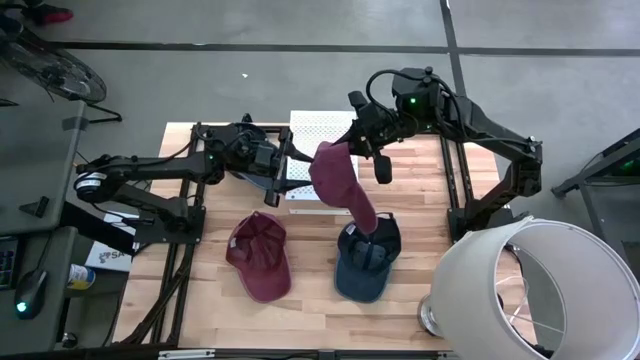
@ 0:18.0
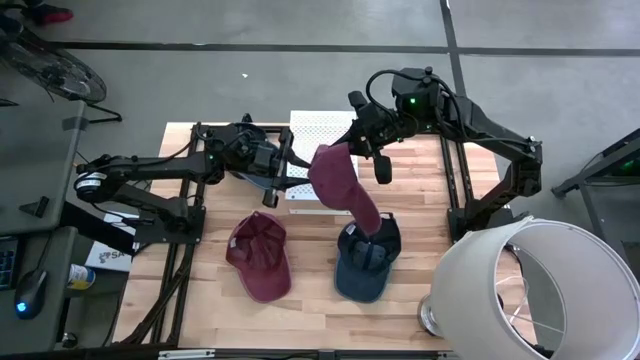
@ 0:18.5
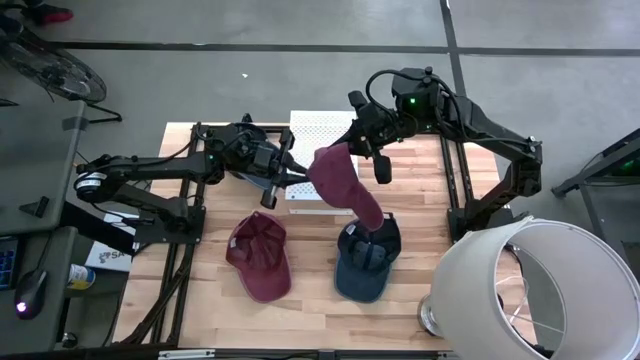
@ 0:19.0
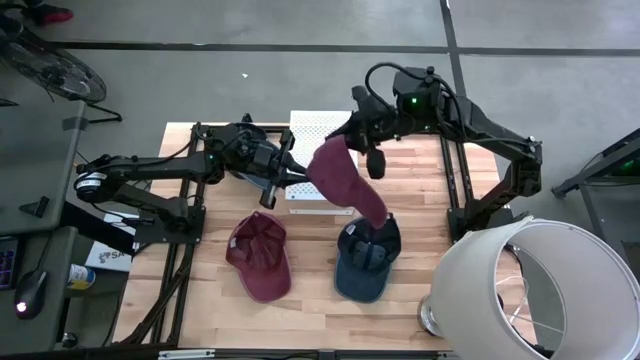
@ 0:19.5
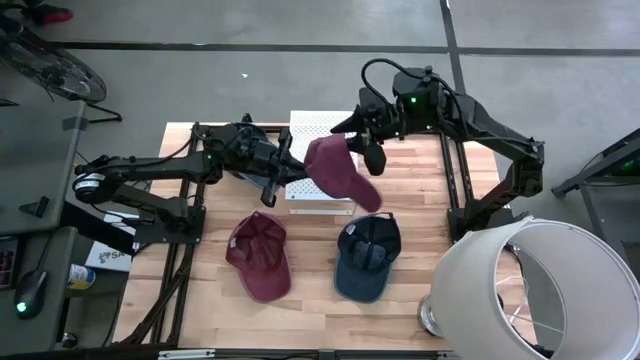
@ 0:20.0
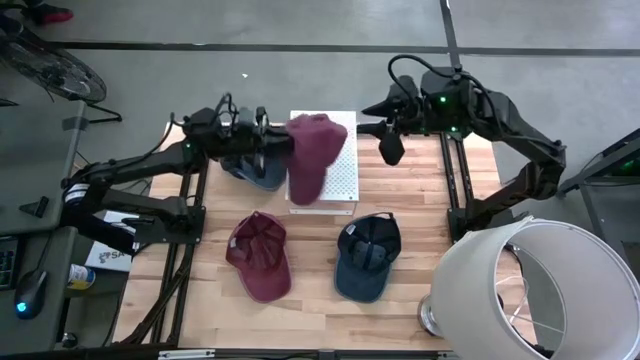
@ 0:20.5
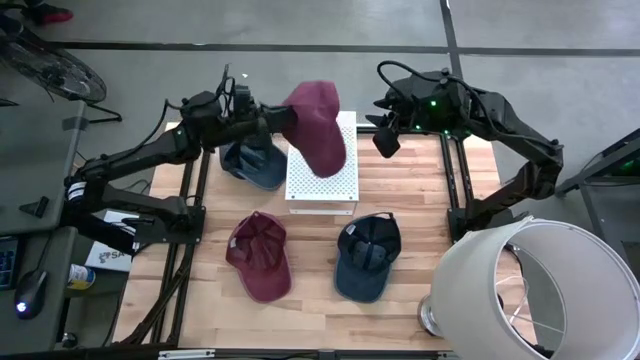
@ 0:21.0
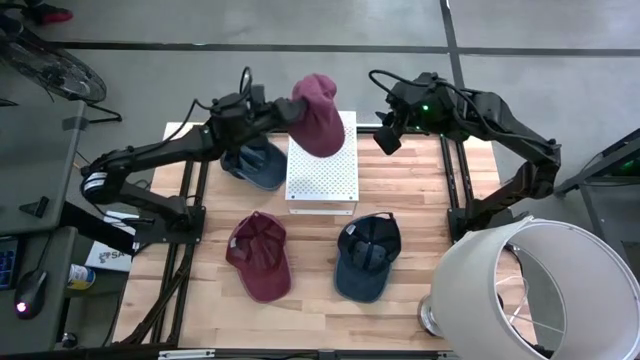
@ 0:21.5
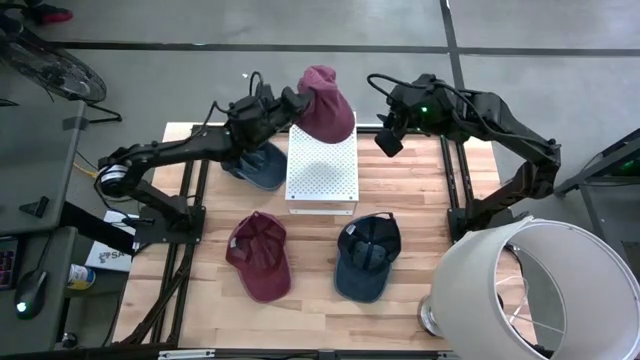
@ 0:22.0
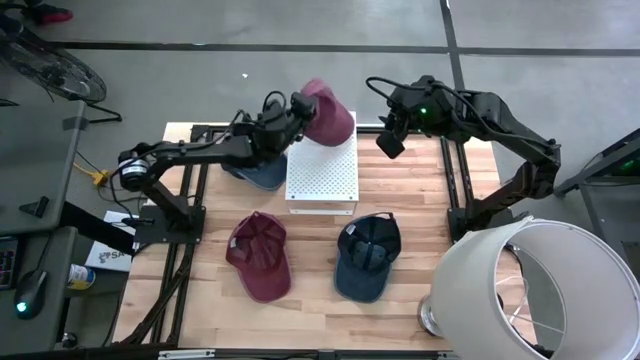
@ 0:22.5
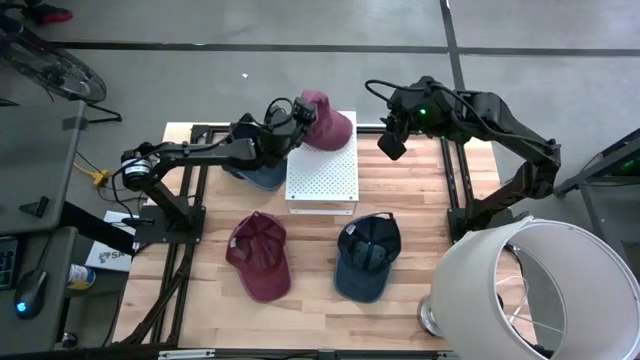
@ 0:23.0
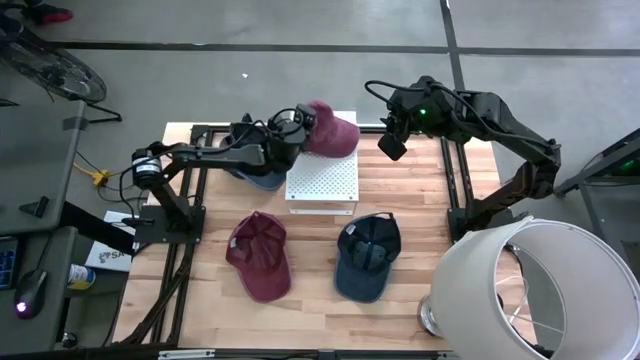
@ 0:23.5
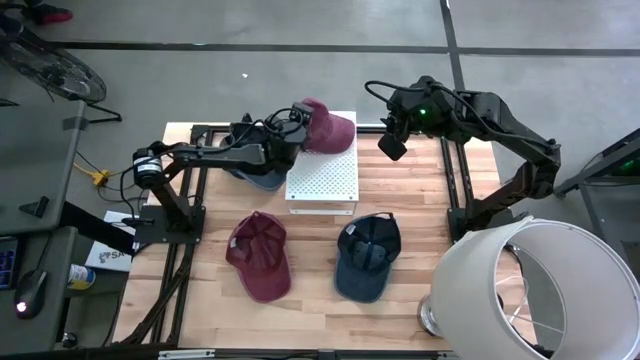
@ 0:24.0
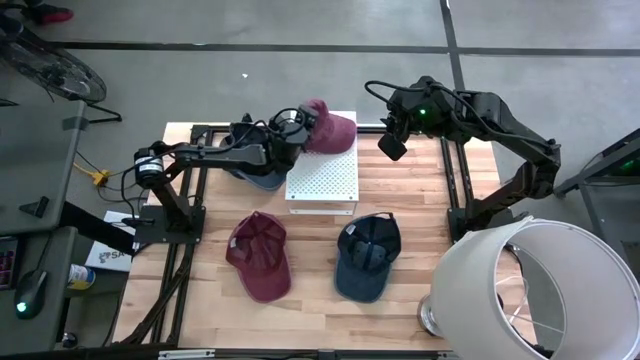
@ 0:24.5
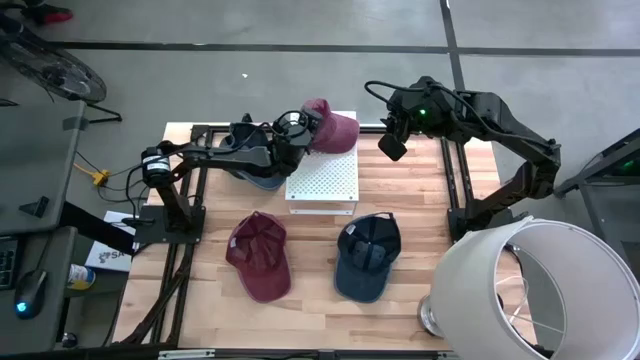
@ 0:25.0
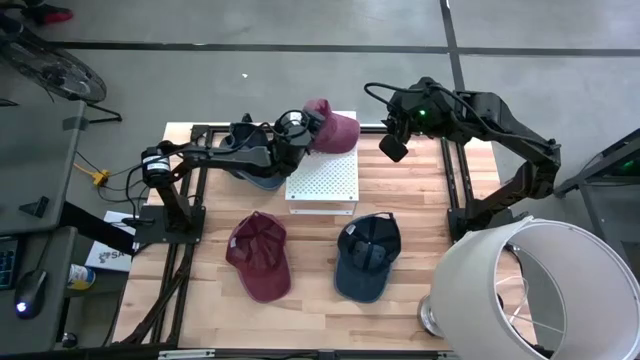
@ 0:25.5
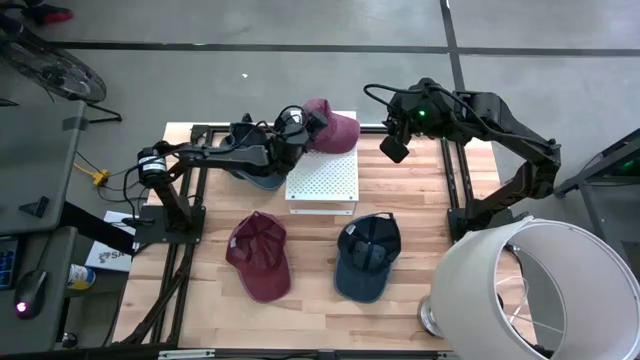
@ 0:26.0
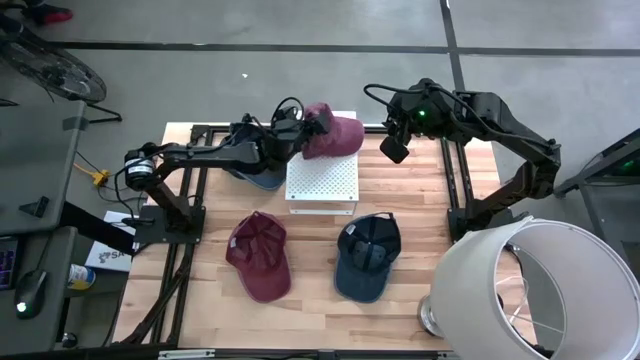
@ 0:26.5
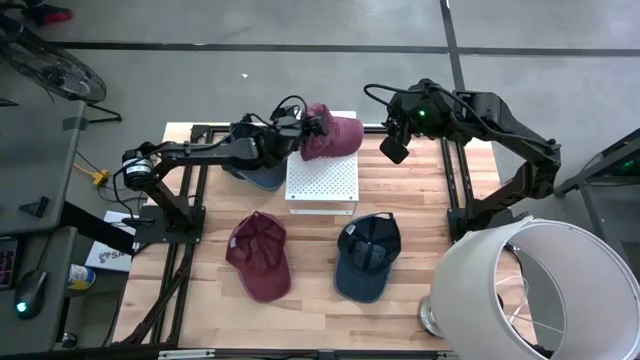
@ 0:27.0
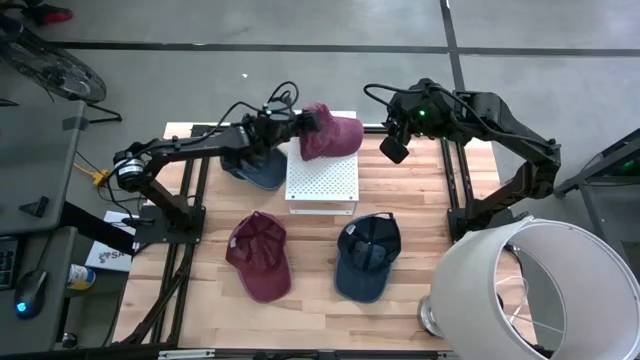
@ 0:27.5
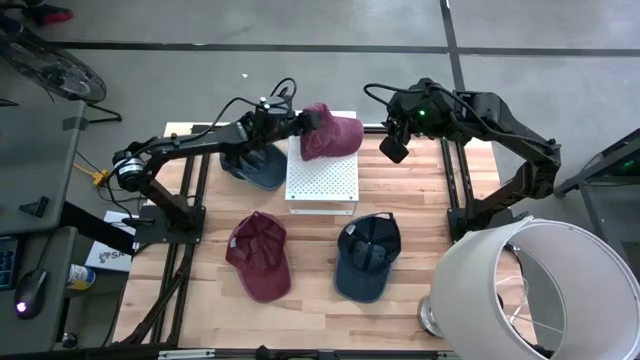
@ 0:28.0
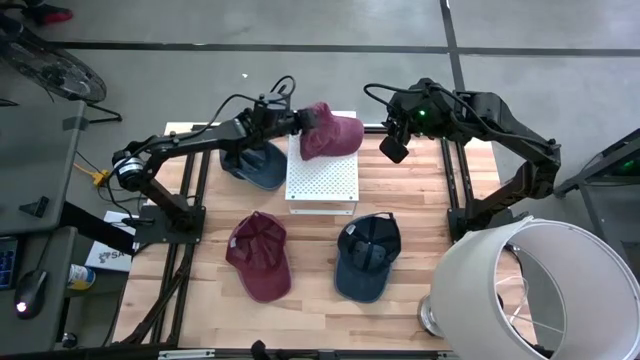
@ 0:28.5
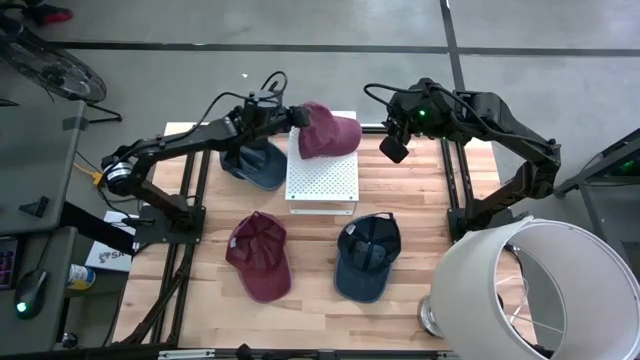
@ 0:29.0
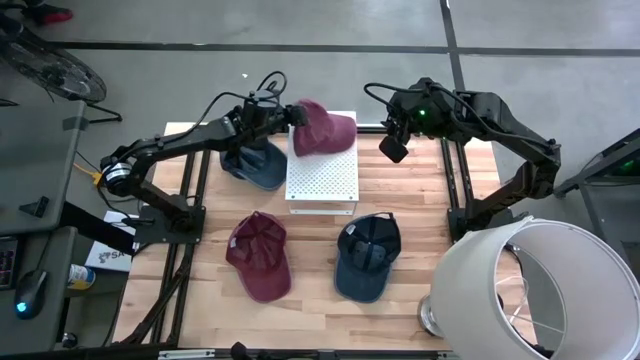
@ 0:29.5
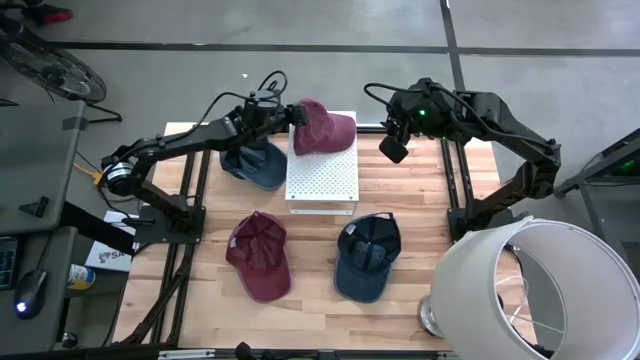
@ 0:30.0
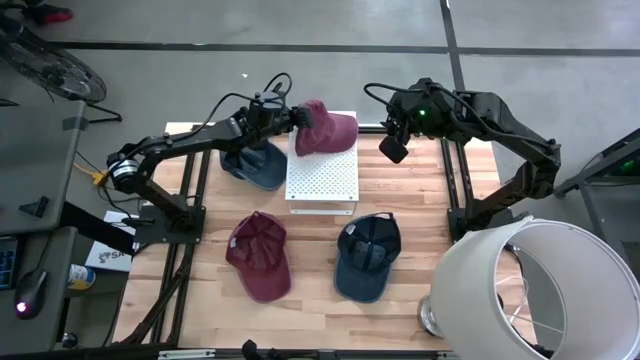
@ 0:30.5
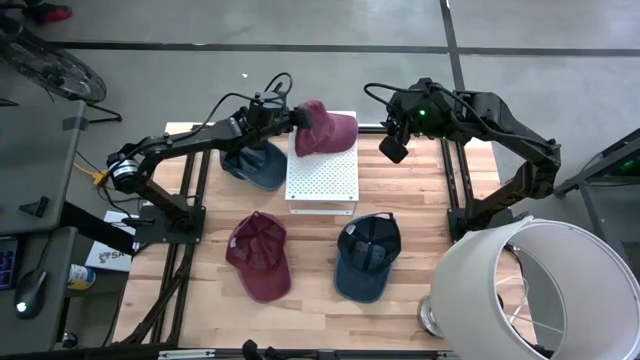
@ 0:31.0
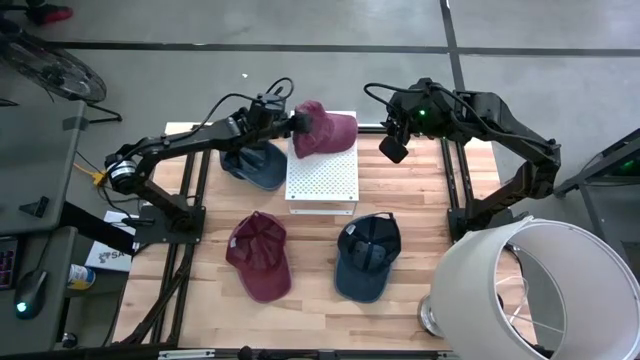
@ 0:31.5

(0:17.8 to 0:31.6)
Task: Pick & Place hat
Put the top red cap on the shelf
